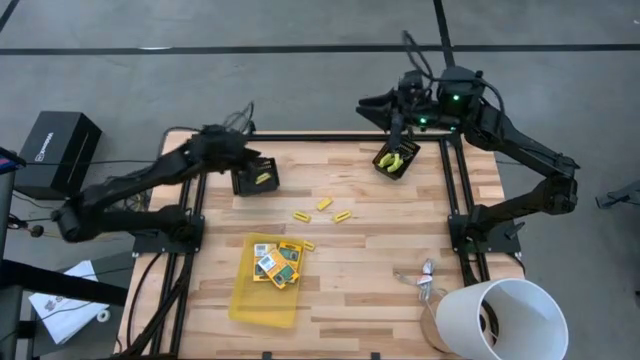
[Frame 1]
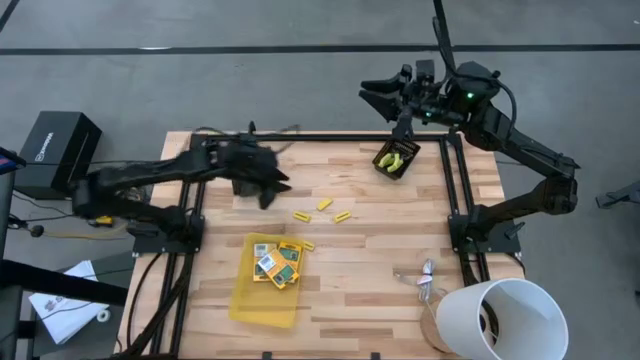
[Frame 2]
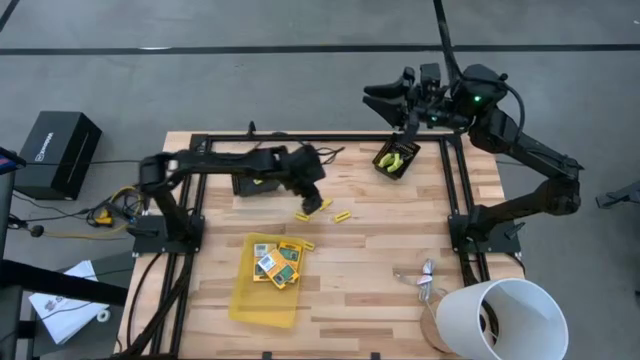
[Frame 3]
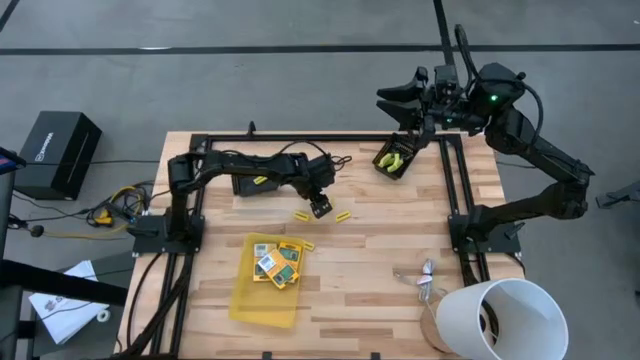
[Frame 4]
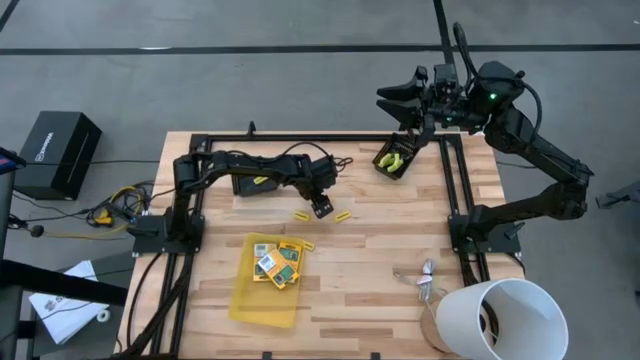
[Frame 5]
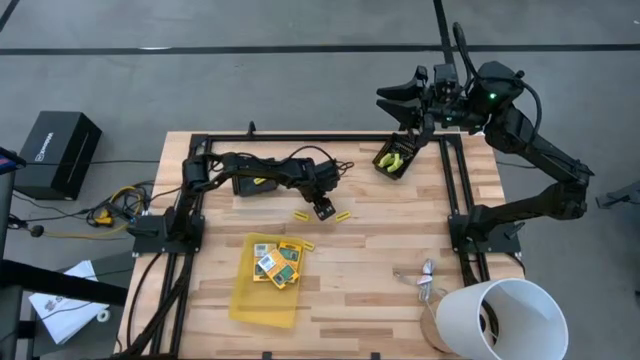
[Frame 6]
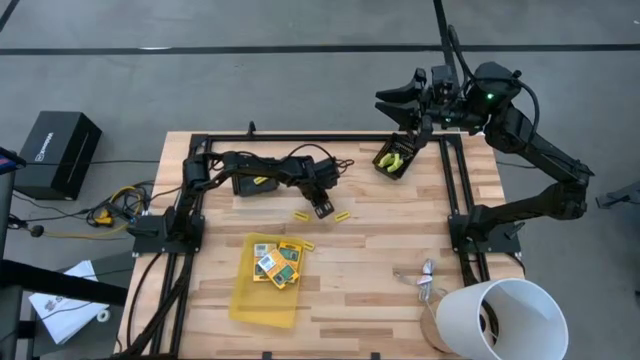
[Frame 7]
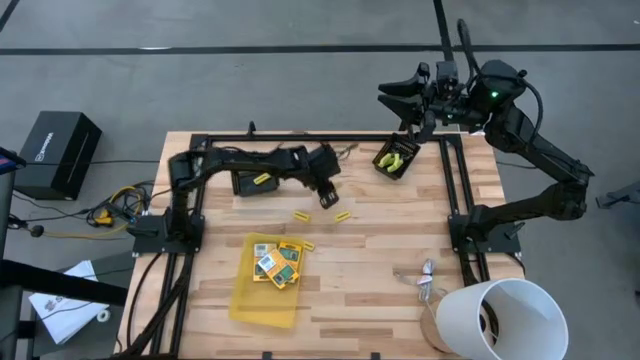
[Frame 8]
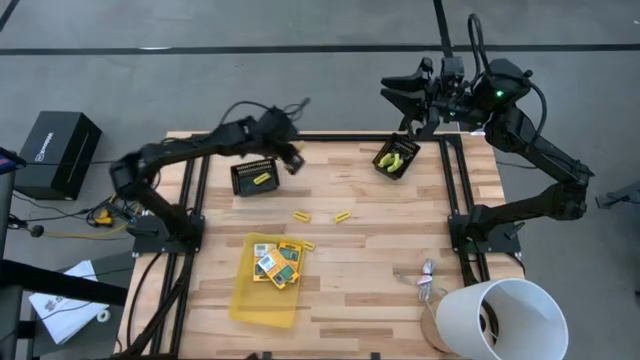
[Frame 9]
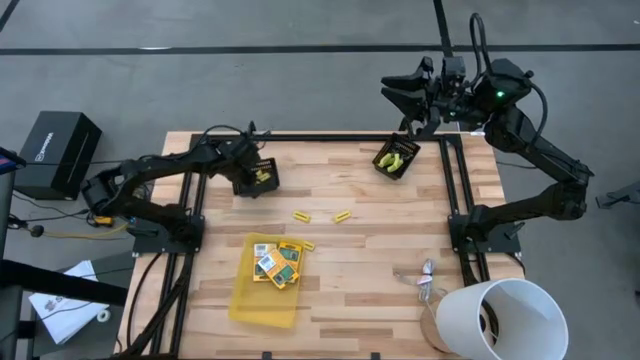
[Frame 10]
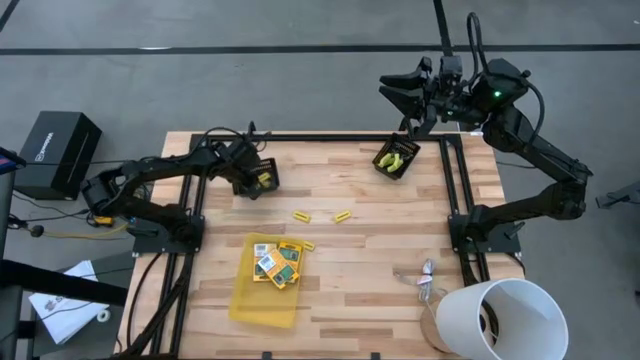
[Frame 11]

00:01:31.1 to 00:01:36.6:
Task: Pick & Place School Supplies
Put the yellow eraser into the left black bin

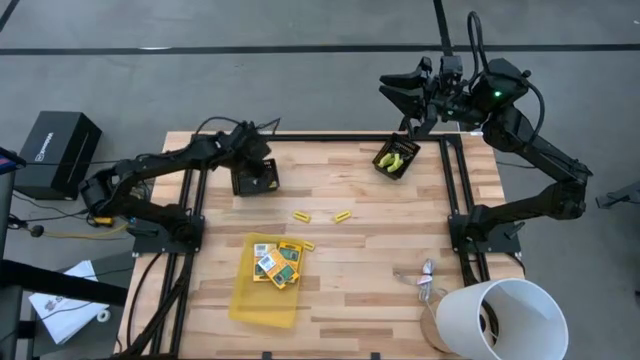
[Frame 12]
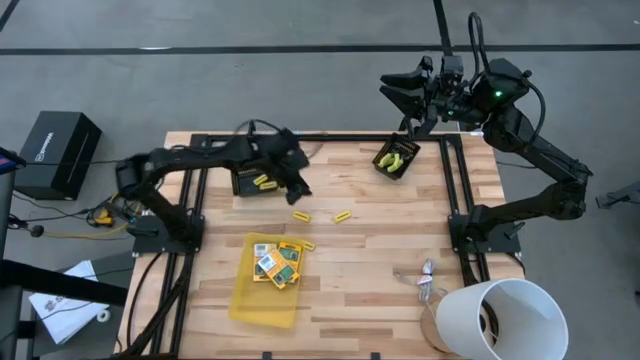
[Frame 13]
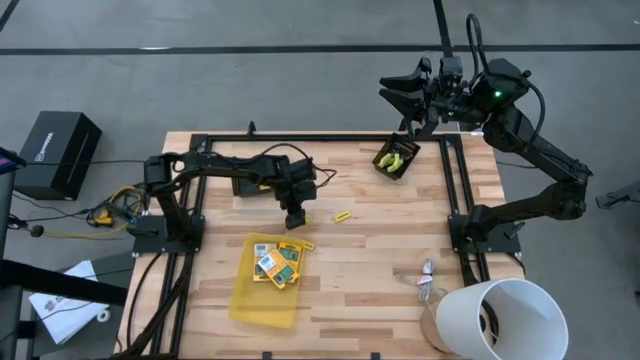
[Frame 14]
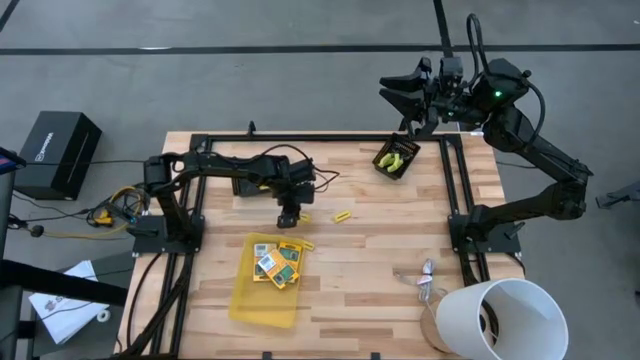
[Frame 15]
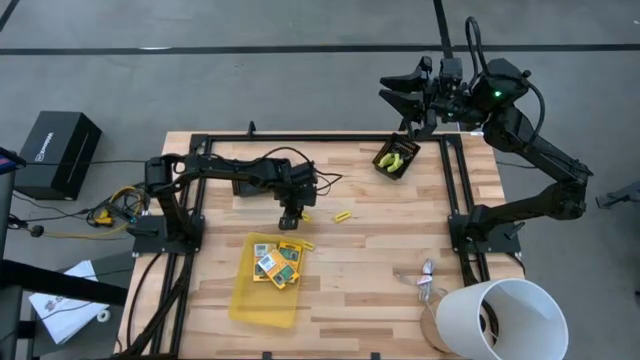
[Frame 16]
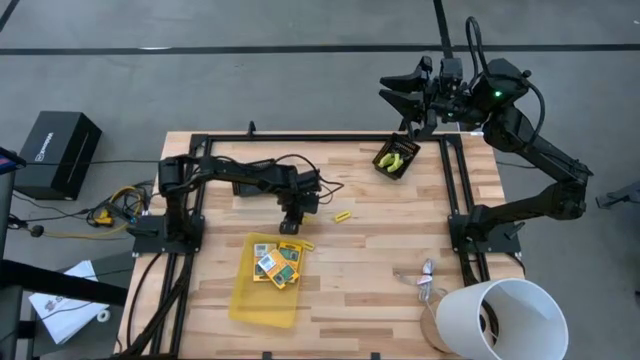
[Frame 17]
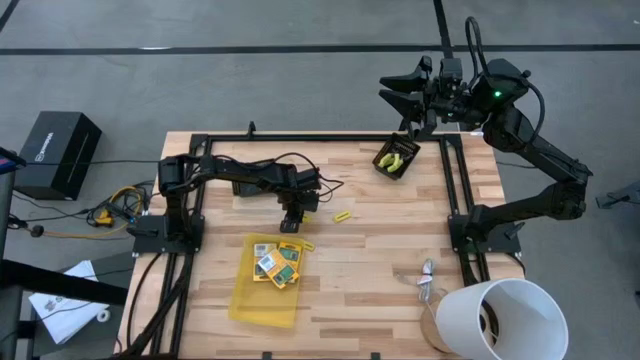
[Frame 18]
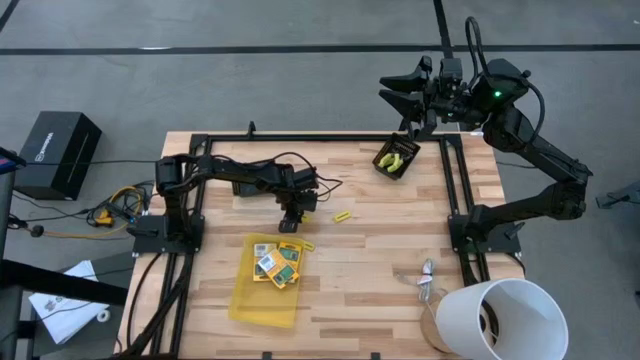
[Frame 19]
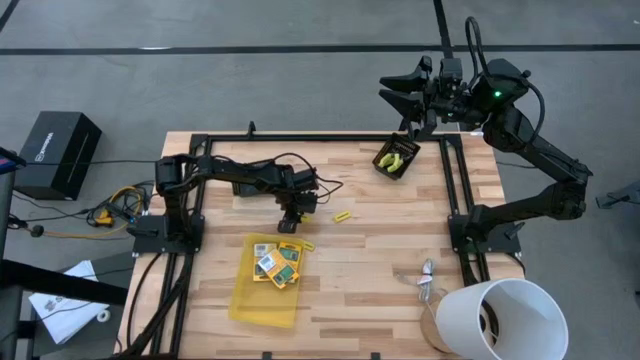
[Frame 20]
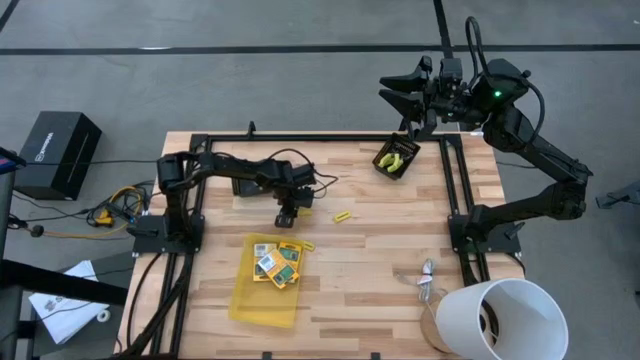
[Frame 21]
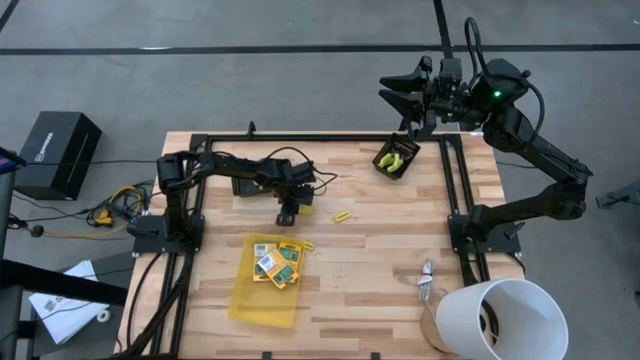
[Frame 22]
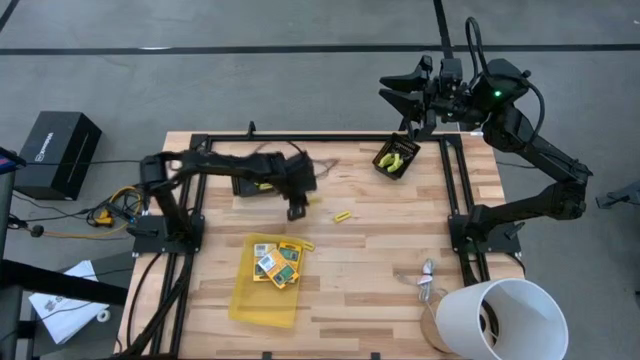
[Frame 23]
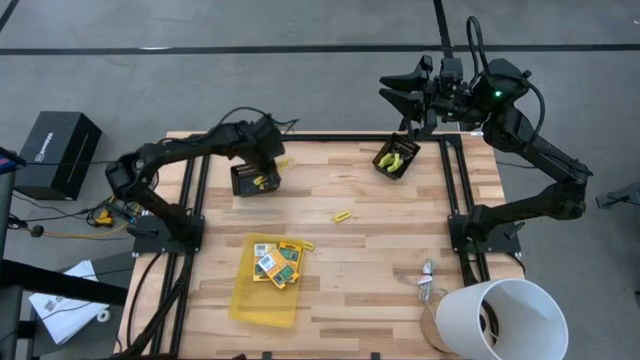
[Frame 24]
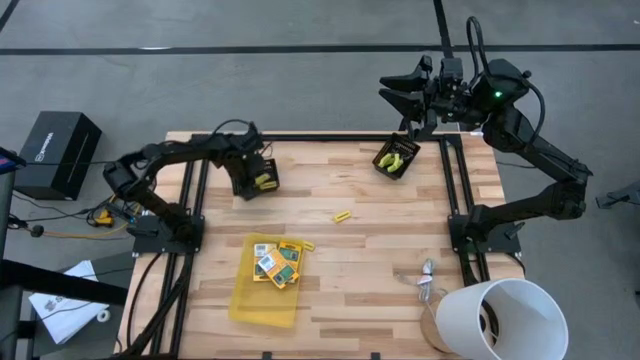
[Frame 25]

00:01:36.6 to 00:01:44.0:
Put the yellow eraser into the left black bin

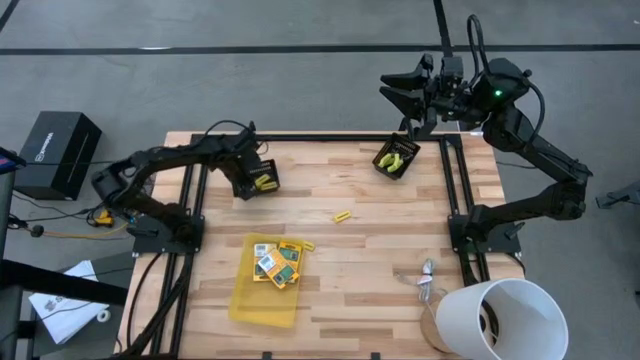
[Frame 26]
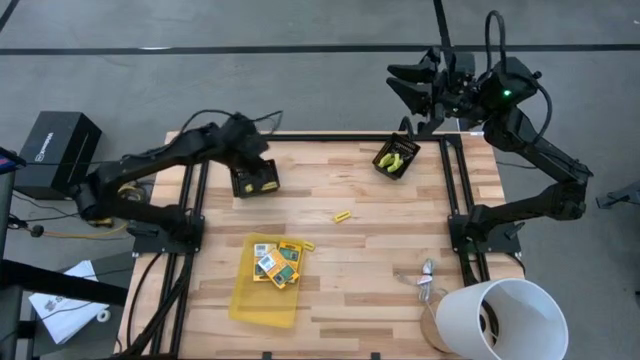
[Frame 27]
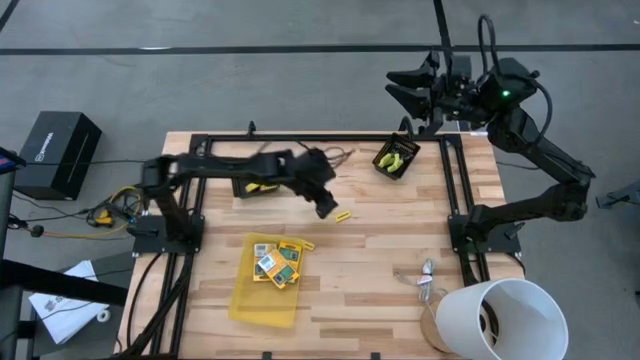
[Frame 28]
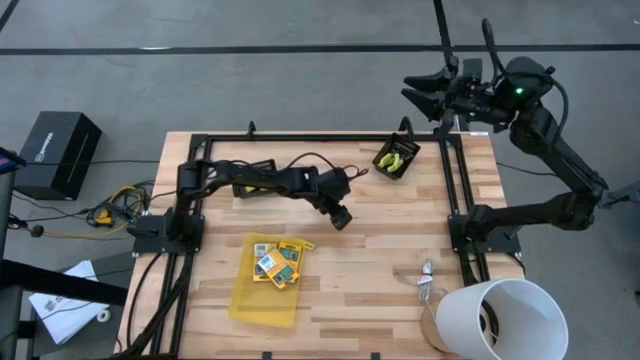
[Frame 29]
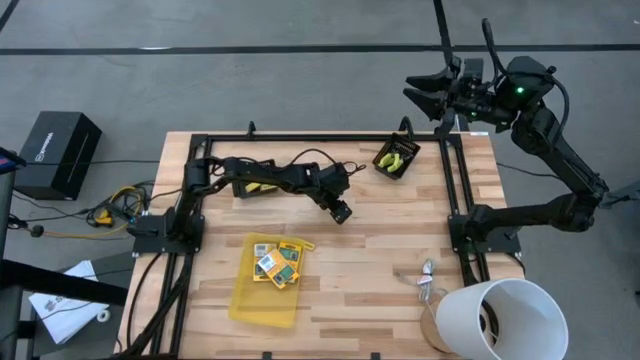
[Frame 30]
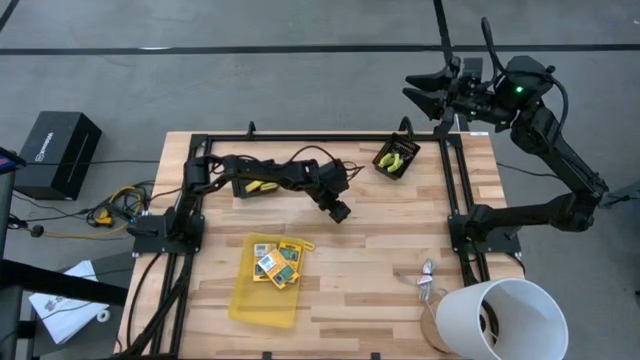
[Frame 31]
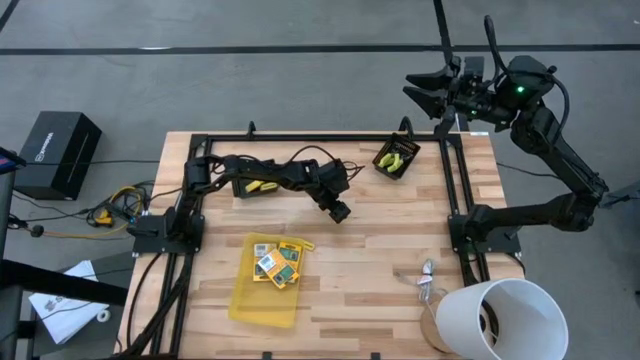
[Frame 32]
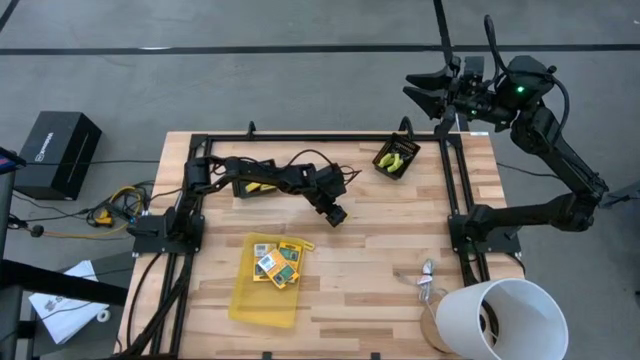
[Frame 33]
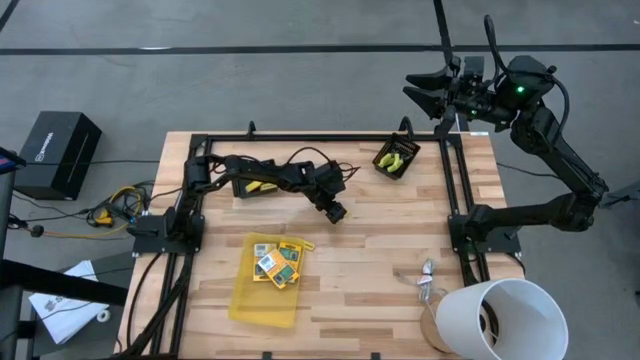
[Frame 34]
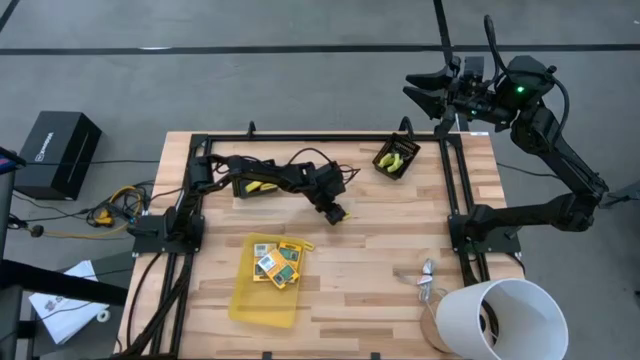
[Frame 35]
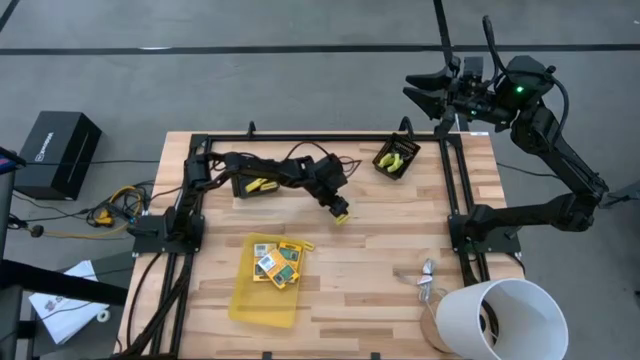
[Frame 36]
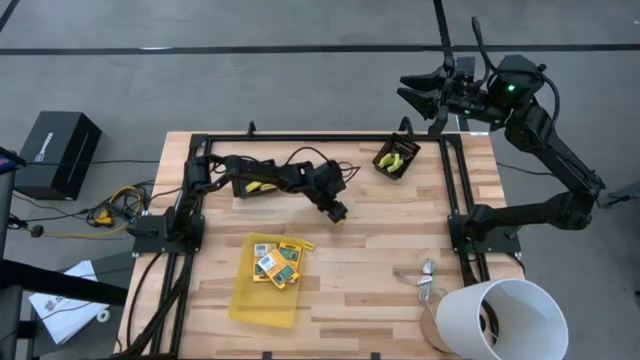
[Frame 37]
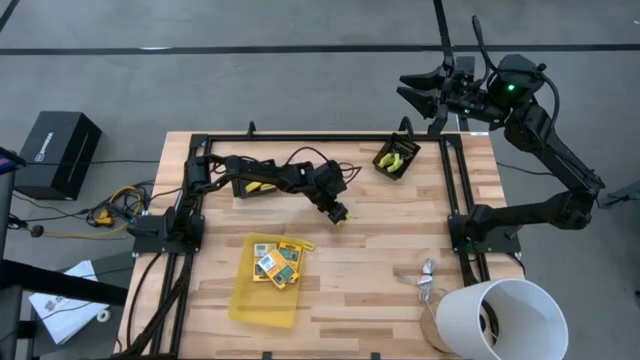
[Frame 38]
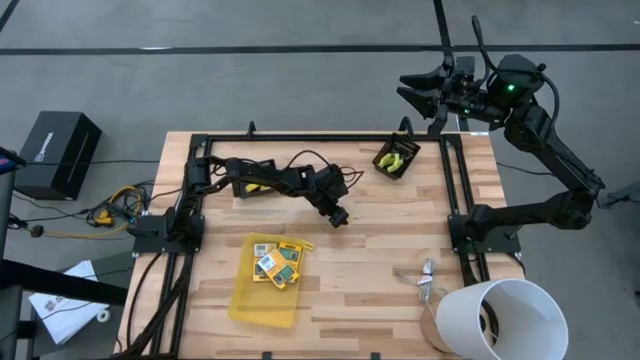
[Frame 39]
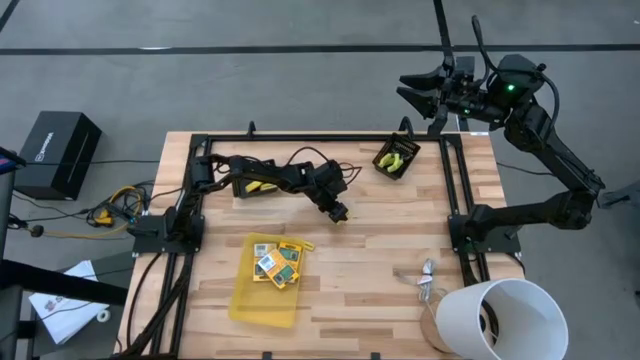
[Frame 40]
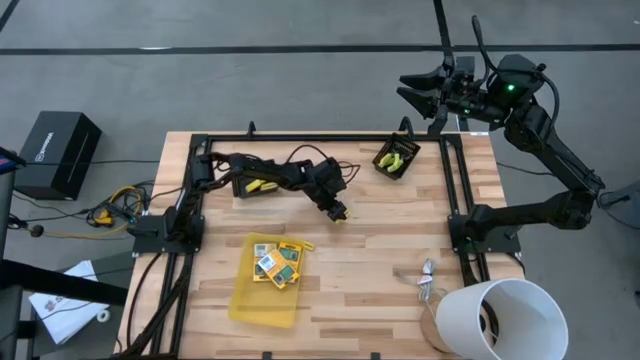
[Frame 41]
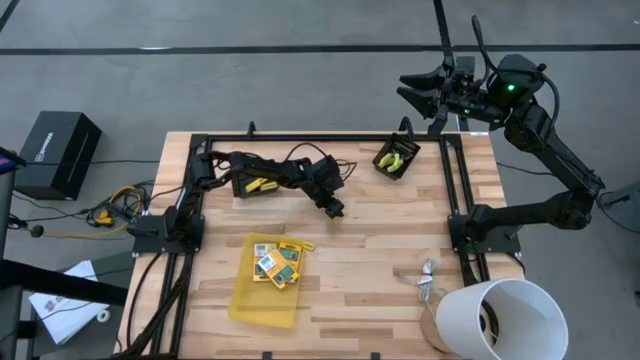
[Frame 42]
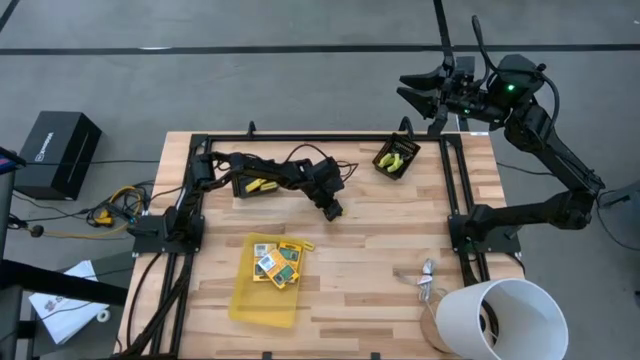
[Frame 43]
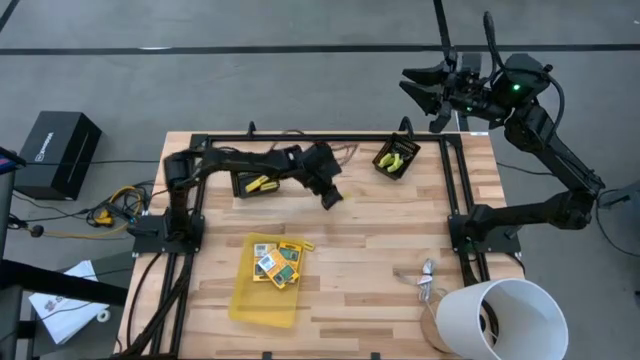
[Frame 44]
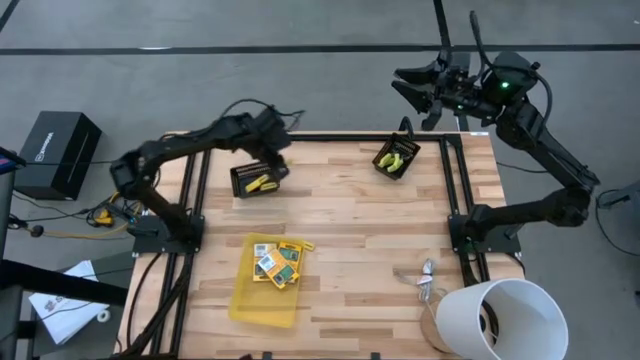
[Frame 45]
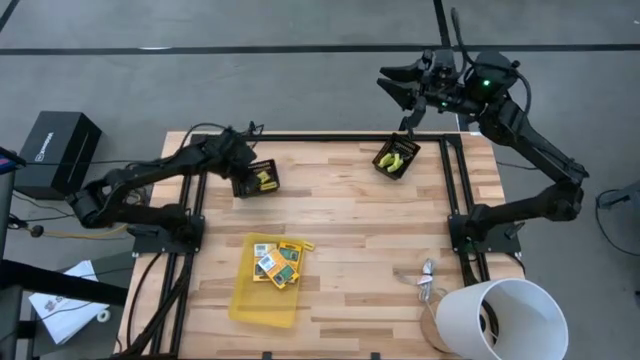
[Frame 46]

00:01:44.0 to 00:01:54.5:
Put the yellow eraser into the left black bin
